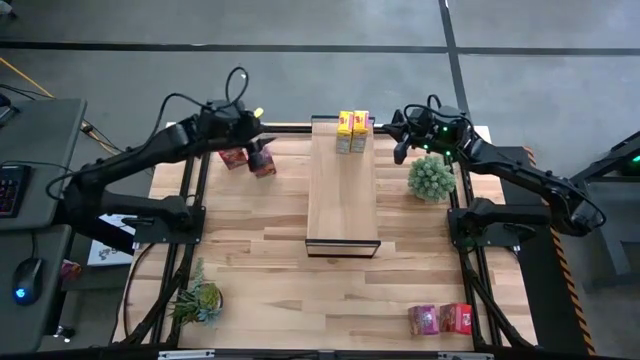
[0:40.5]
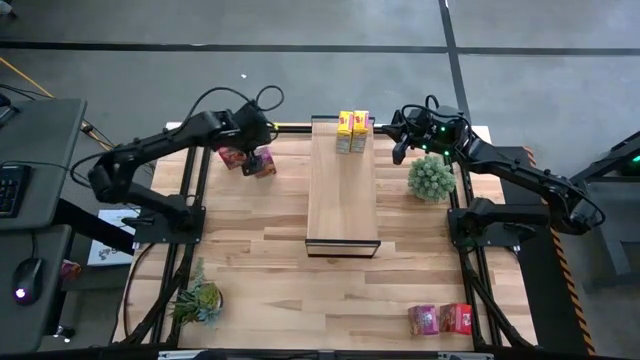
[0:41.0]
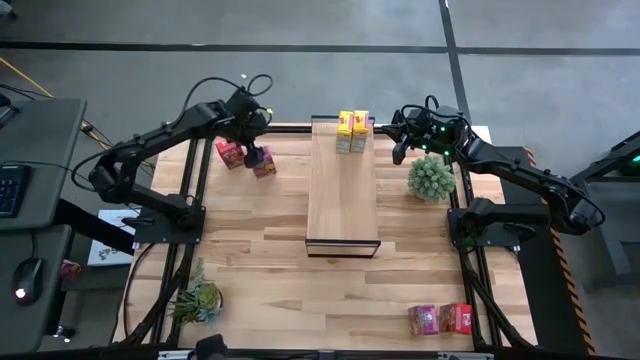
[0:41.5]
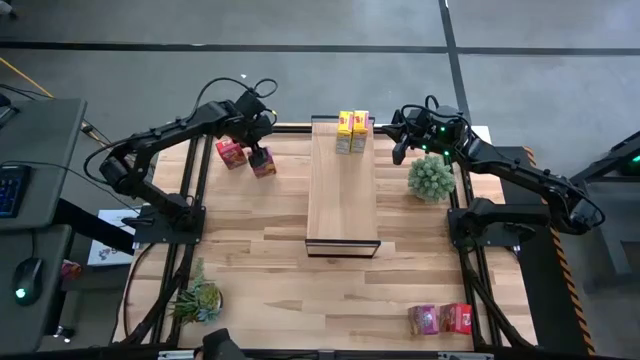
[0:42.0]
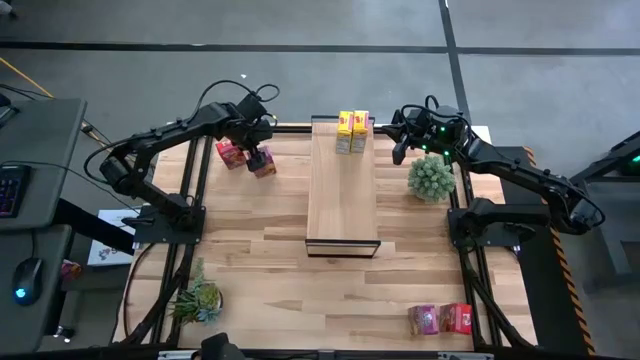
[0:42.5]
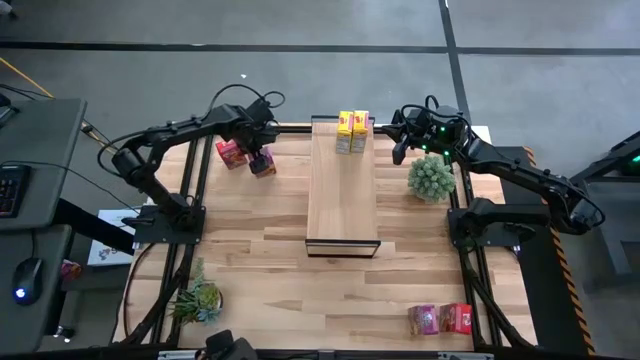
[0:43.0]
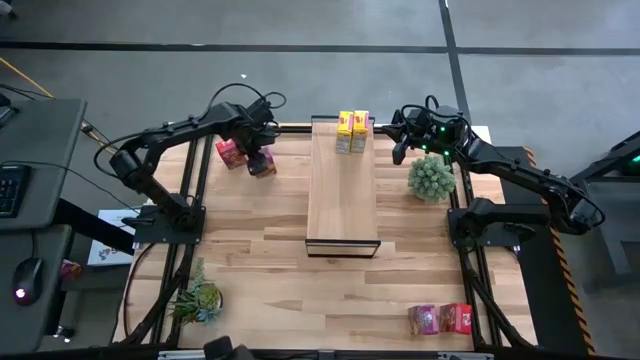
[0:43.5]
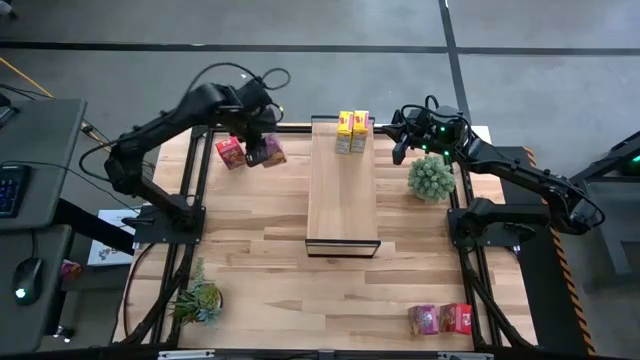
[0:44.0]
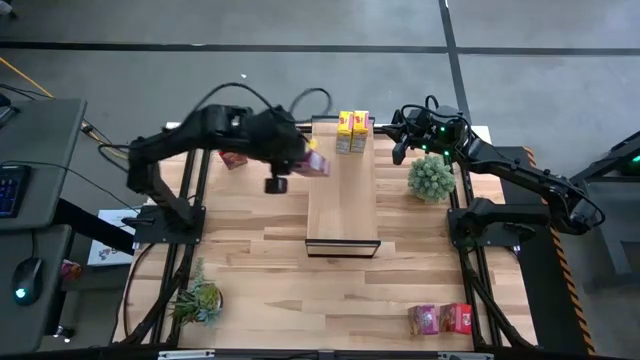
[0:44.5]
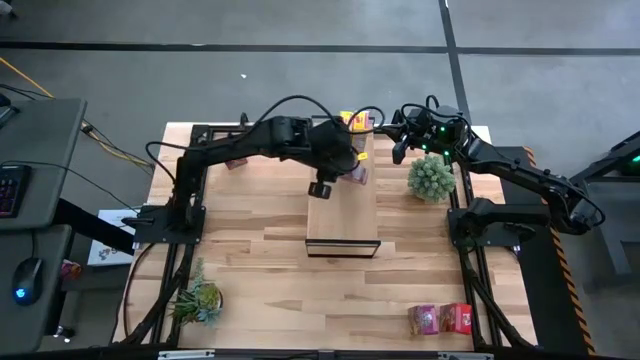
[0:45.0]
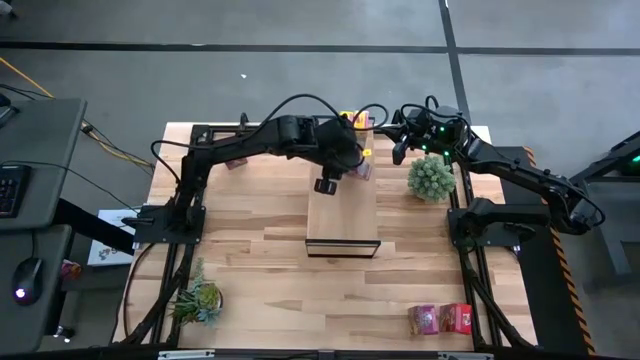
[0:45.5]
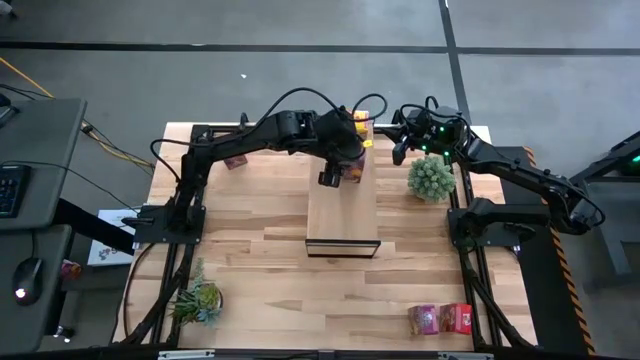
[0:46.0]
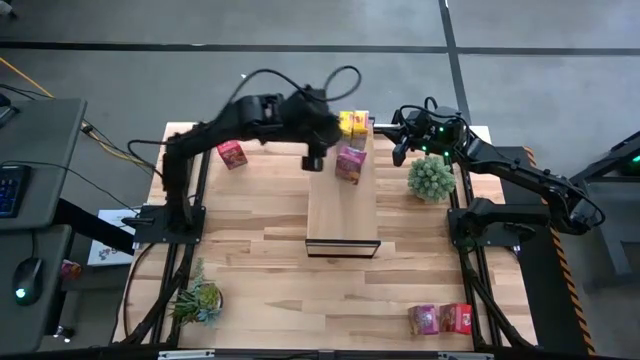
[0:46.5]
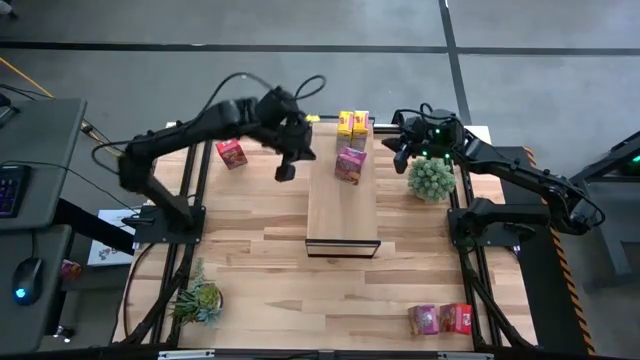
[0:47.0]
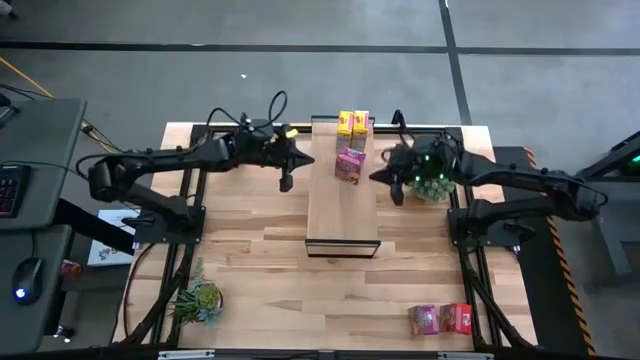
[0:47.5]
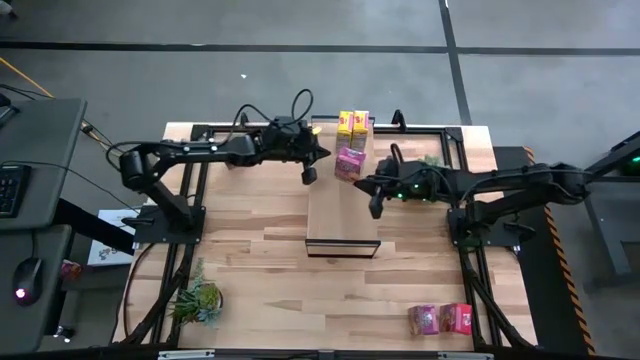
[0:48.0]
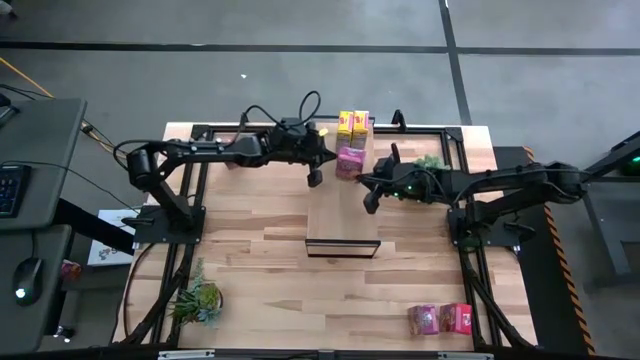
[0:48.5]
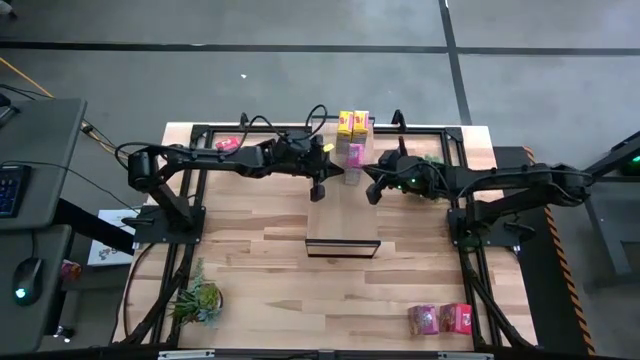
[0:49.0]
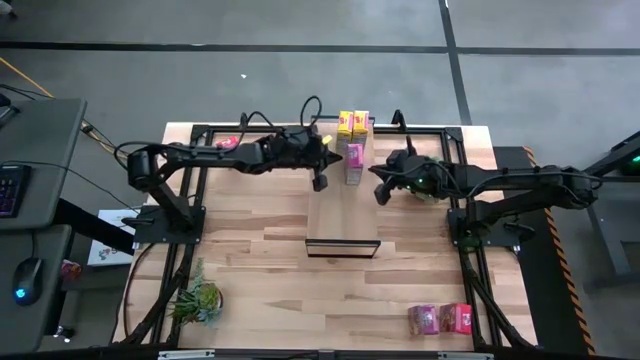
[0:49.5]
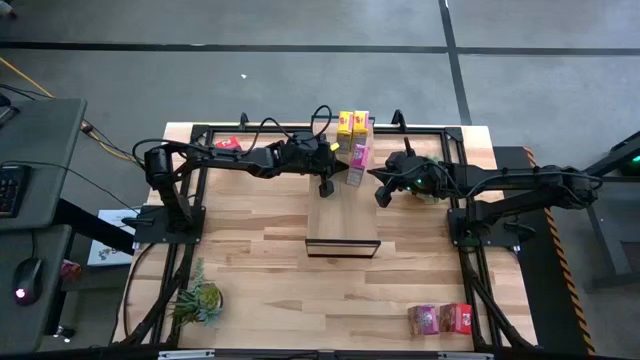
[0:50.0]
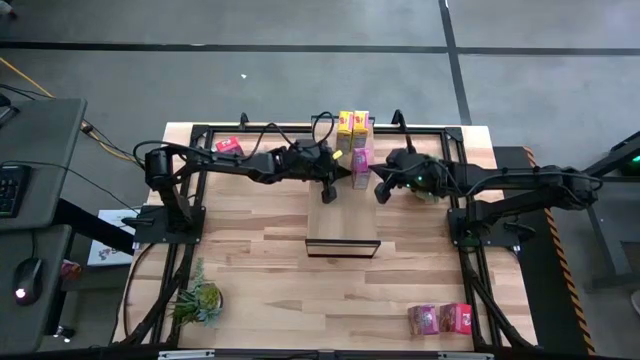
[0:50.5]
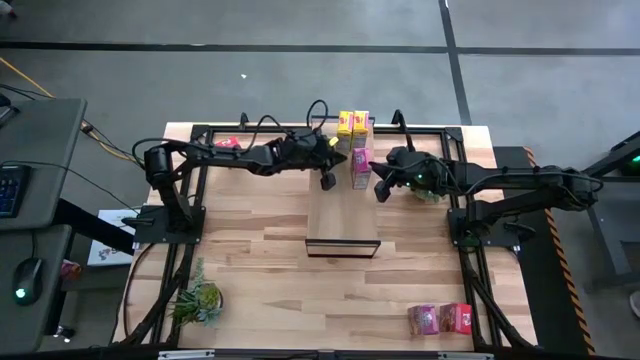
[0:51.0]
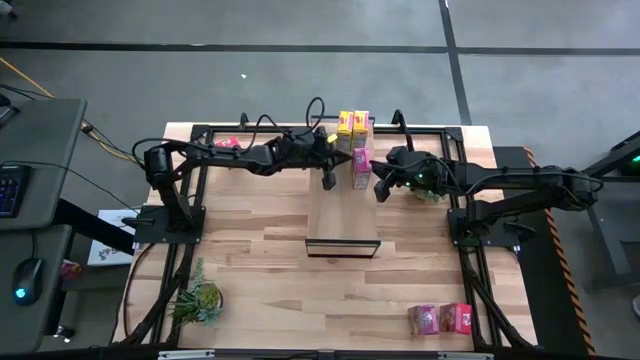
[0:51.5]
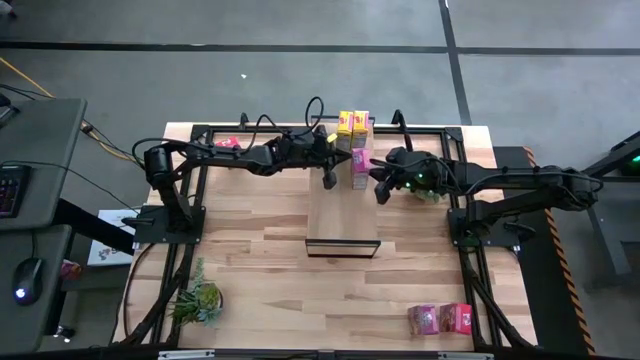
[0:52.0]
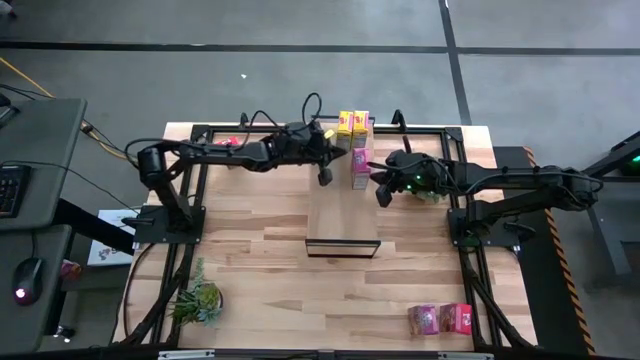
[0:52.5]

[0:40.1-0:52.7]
Task: Stack cereal on shelf
Put the top pink cereal box on the shelf

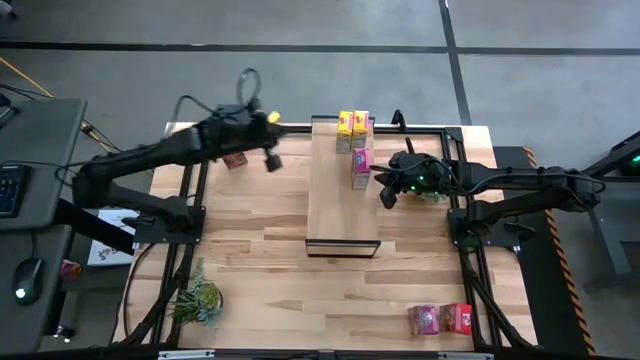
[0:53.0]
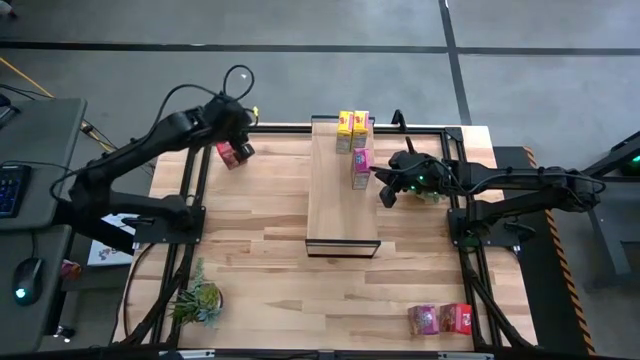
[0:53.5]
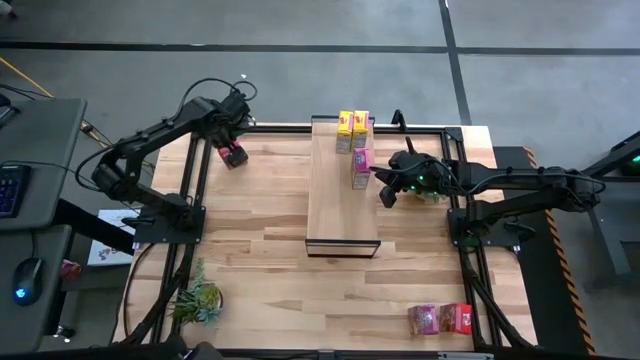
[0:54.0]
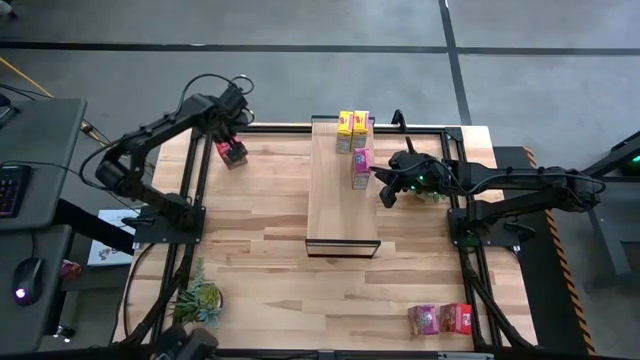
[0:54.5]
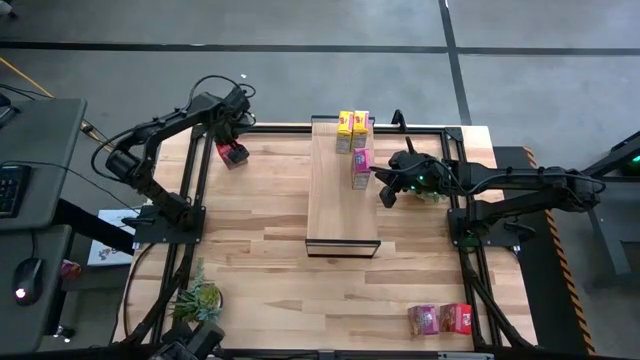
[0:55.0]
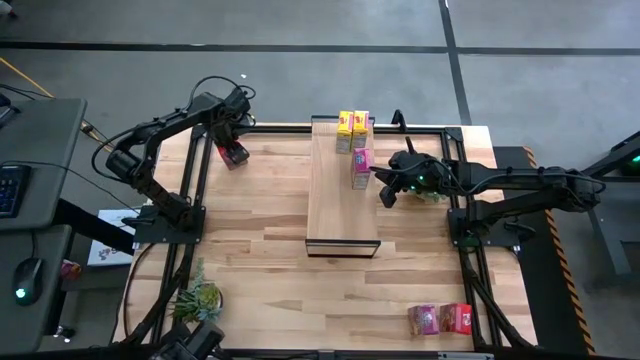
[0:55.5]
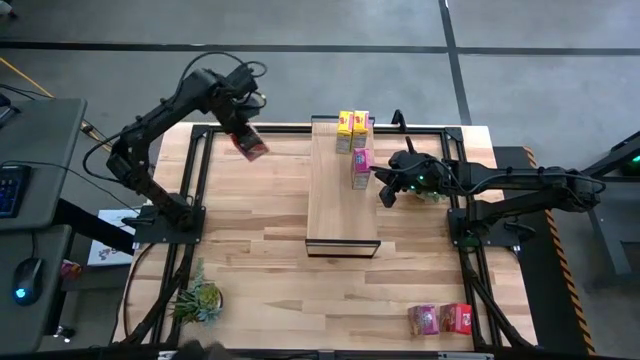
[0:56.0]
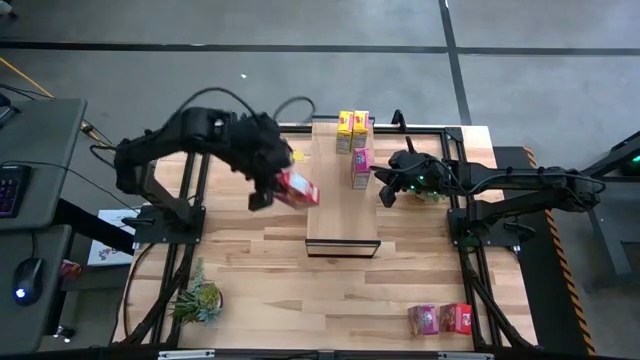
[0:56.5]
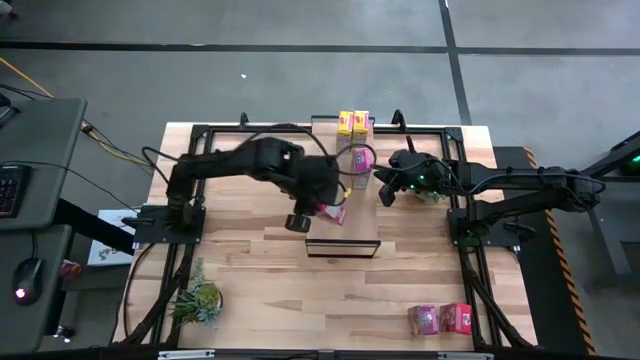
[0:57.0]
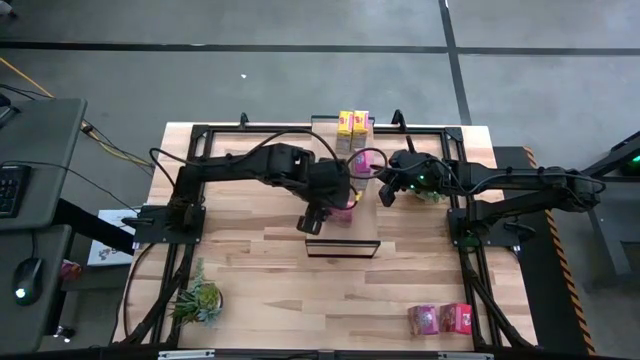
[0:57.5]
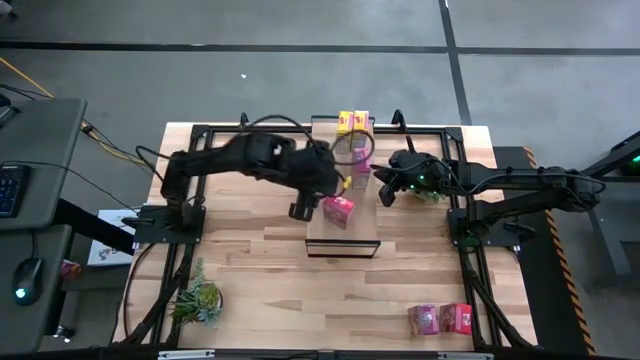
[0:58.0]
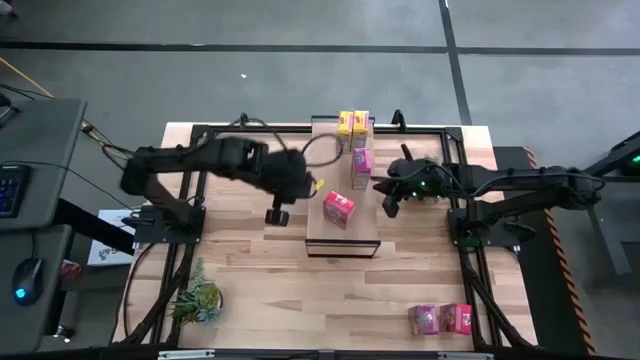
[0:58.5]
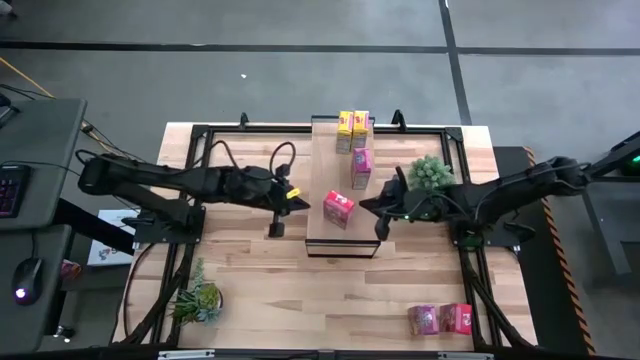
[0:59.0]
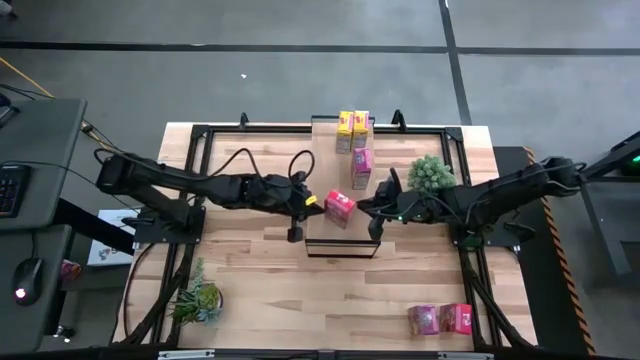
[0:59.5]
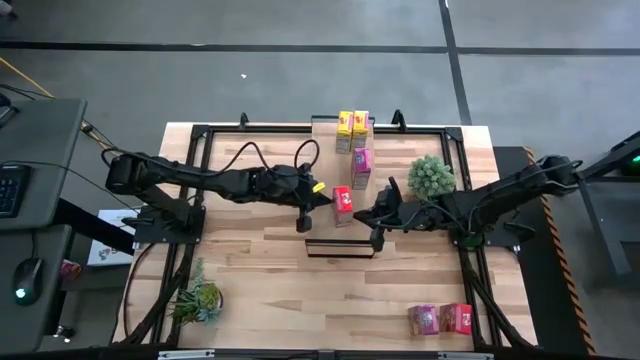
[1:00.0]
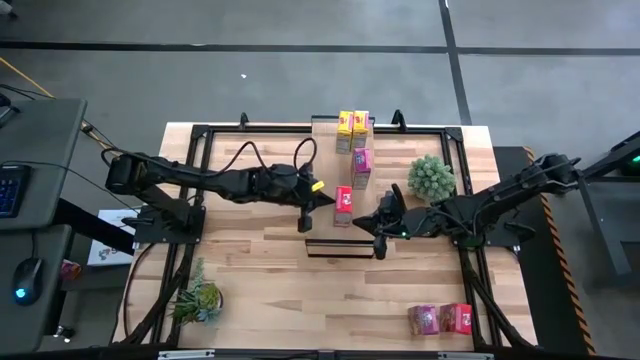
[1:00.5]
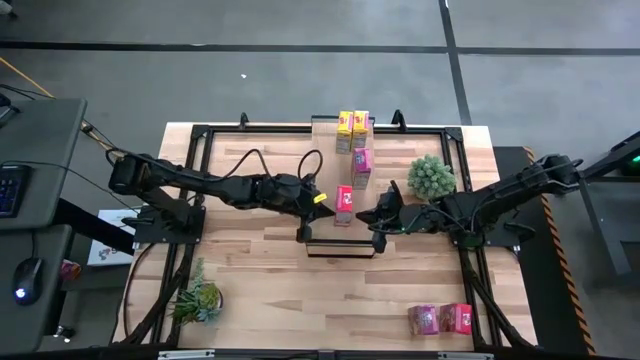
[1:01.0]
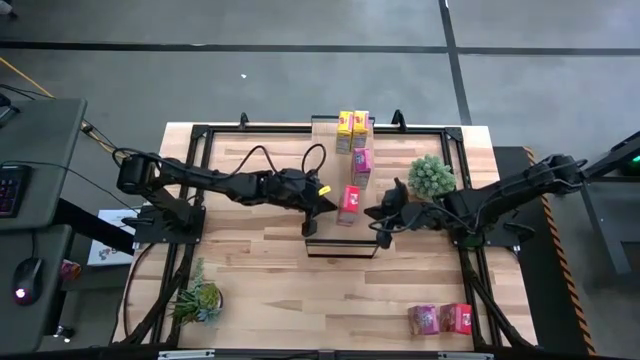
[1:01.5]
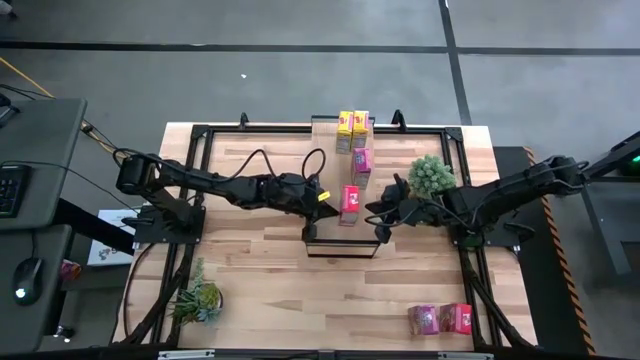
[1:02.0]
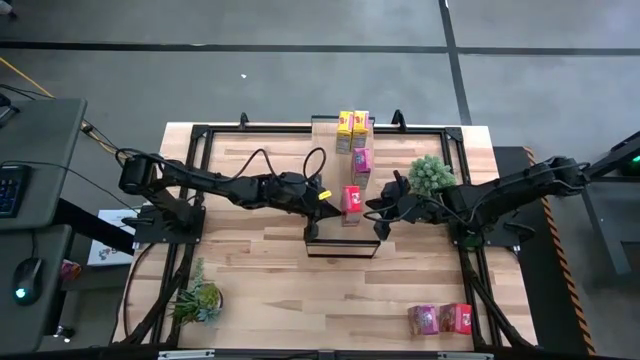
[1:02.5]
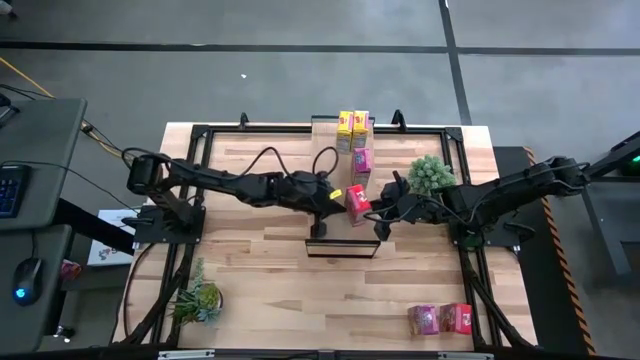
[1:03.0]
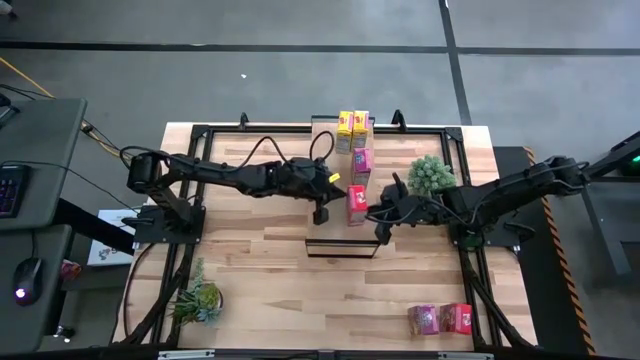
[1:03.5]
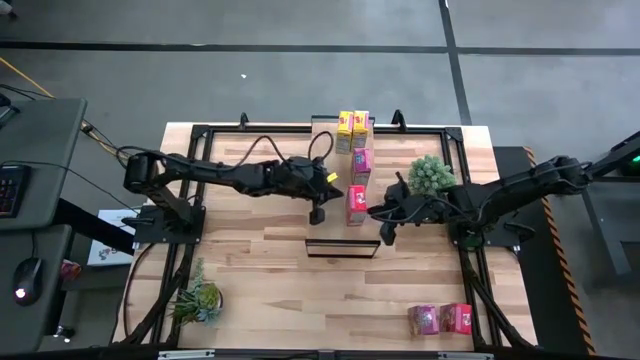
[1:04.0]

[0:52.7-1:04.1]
Put the top red cereal box on the shelf
